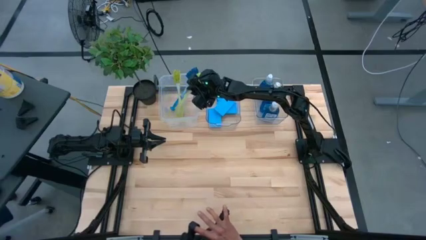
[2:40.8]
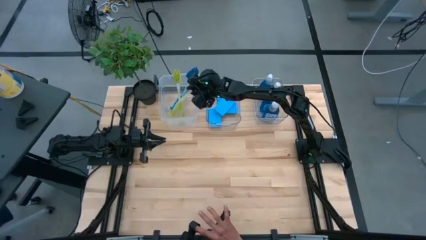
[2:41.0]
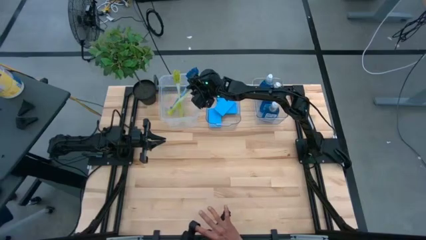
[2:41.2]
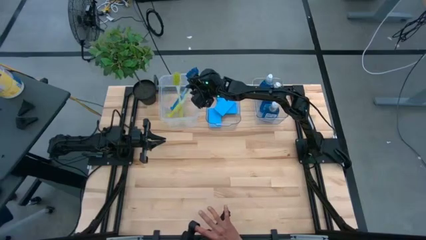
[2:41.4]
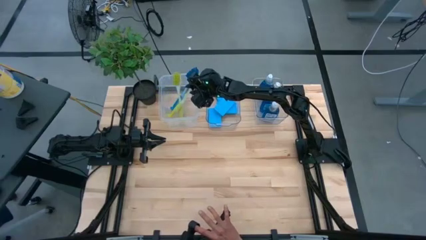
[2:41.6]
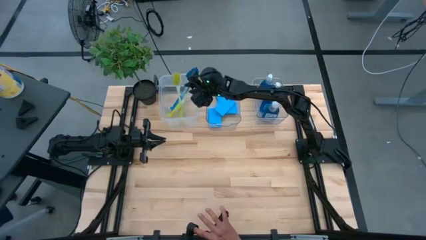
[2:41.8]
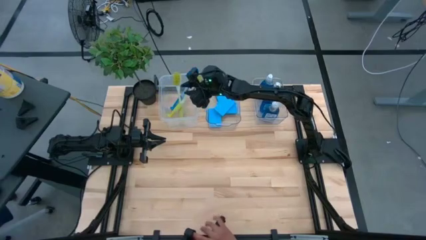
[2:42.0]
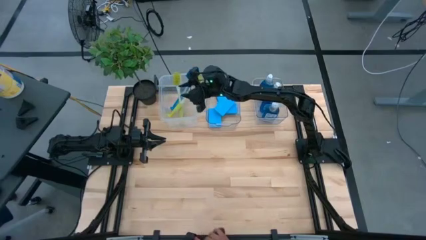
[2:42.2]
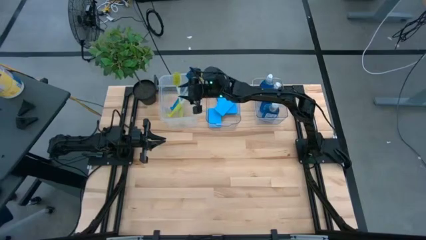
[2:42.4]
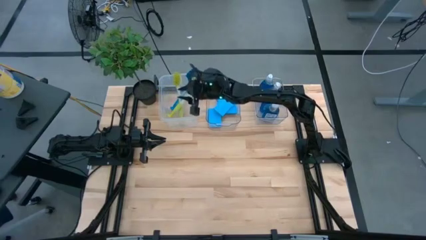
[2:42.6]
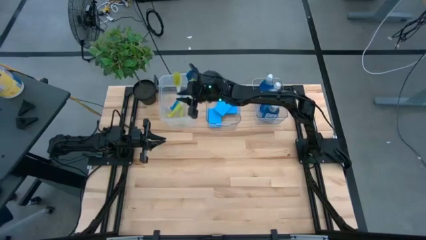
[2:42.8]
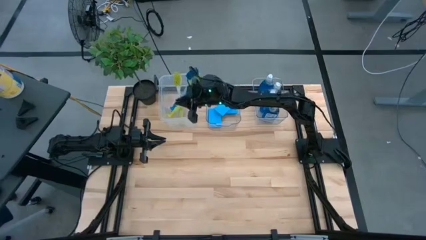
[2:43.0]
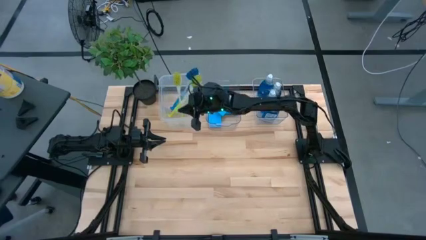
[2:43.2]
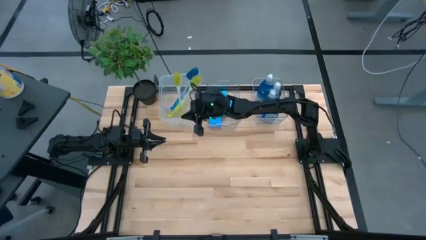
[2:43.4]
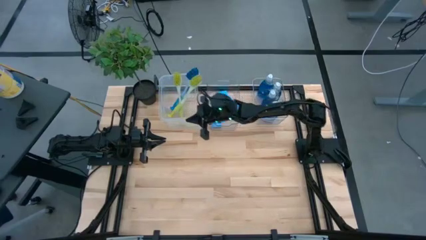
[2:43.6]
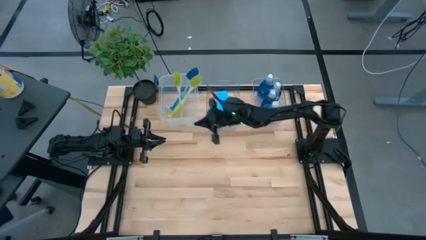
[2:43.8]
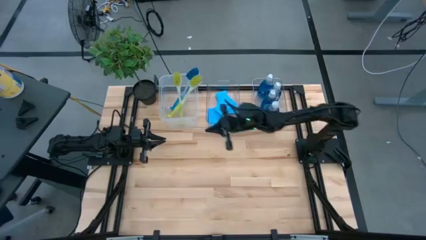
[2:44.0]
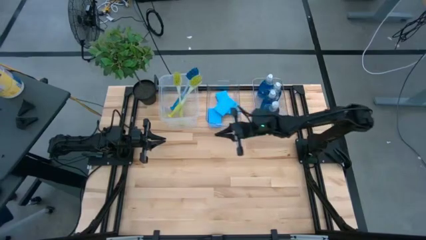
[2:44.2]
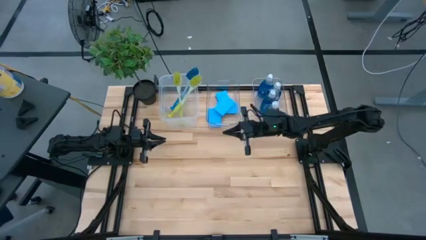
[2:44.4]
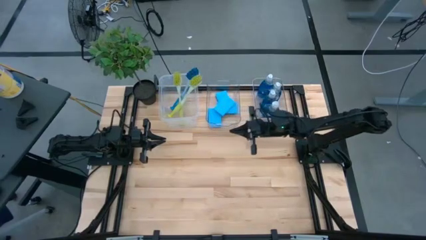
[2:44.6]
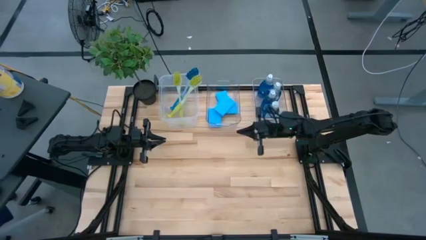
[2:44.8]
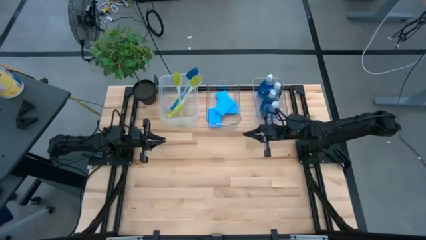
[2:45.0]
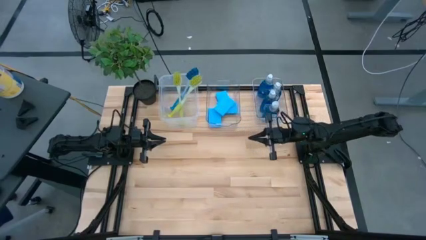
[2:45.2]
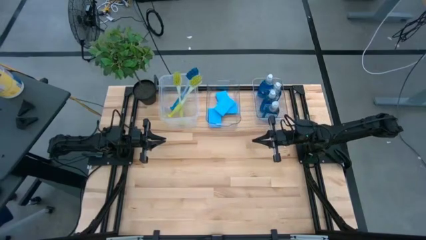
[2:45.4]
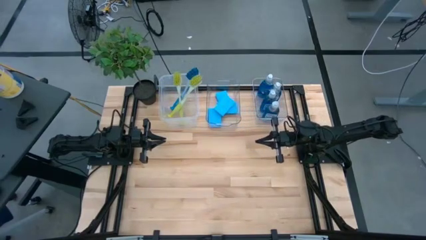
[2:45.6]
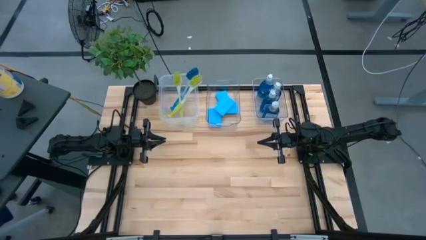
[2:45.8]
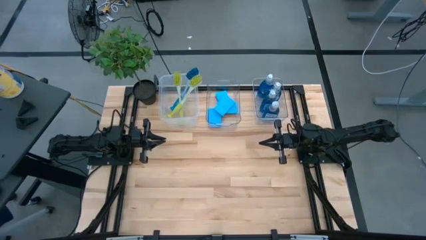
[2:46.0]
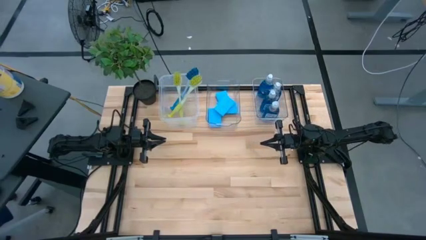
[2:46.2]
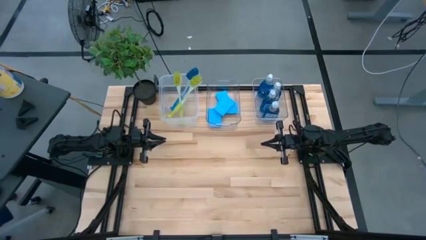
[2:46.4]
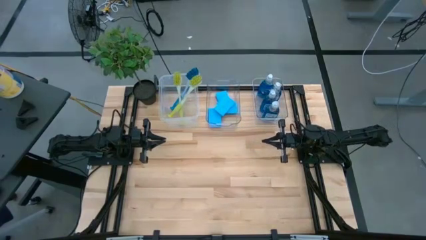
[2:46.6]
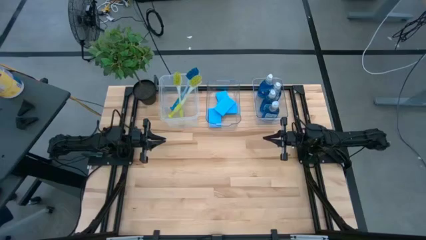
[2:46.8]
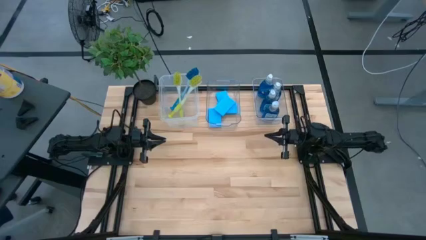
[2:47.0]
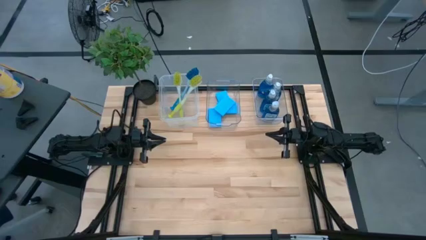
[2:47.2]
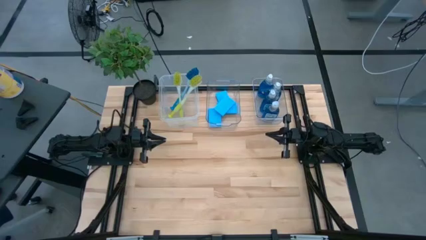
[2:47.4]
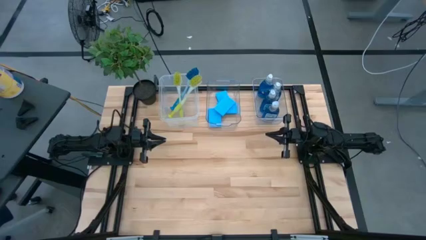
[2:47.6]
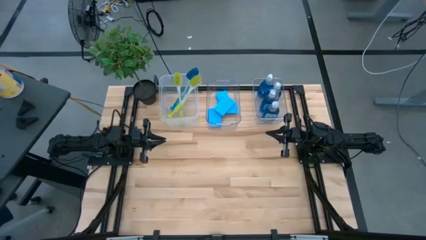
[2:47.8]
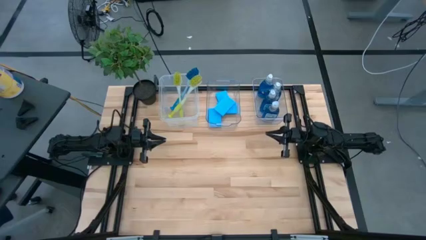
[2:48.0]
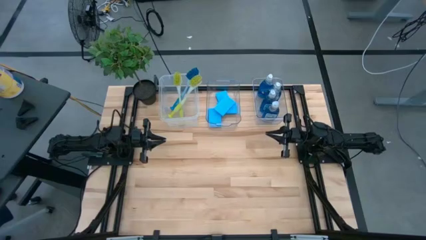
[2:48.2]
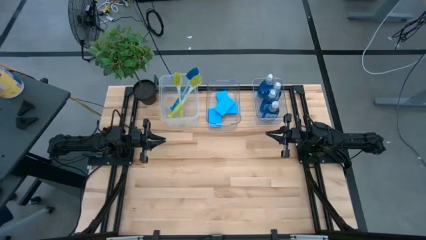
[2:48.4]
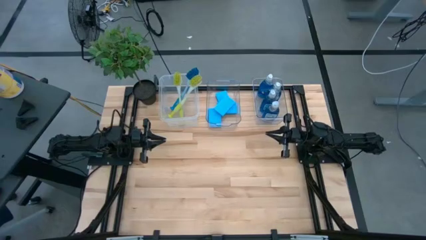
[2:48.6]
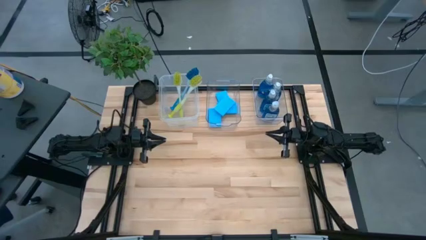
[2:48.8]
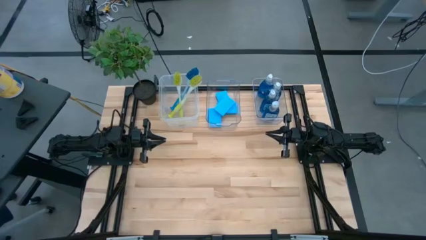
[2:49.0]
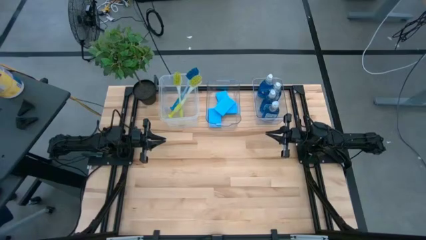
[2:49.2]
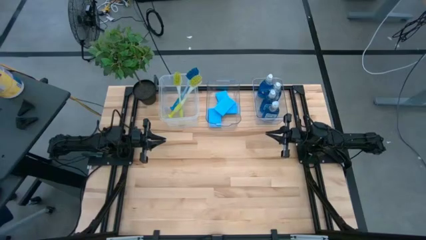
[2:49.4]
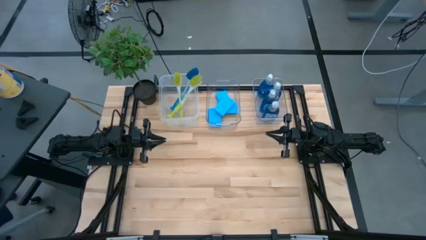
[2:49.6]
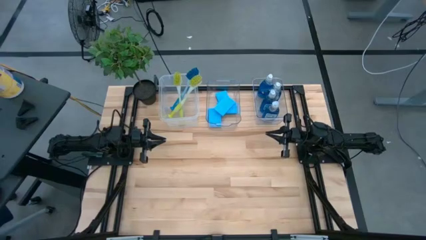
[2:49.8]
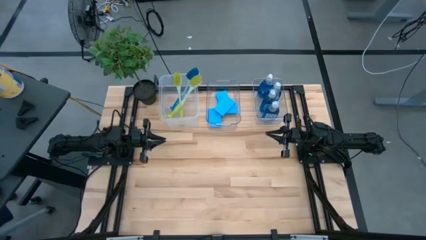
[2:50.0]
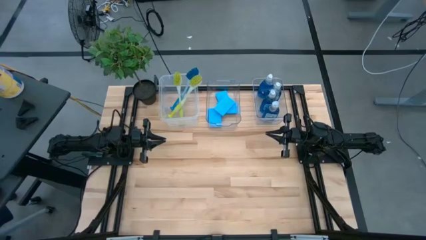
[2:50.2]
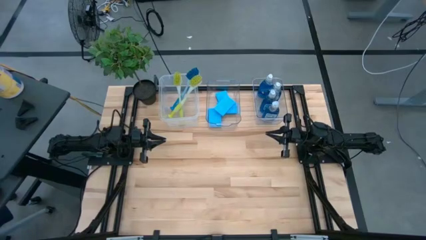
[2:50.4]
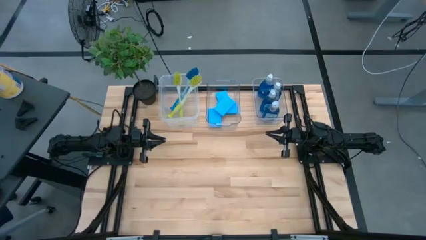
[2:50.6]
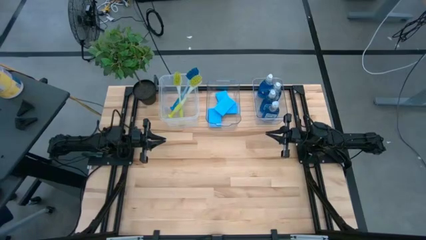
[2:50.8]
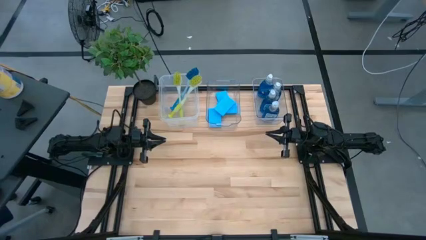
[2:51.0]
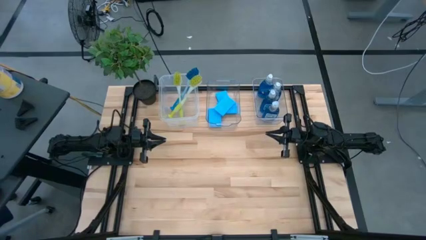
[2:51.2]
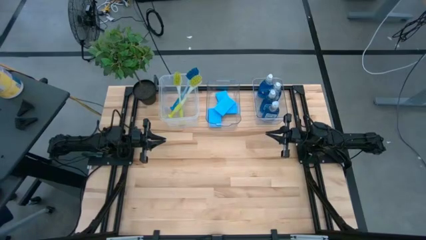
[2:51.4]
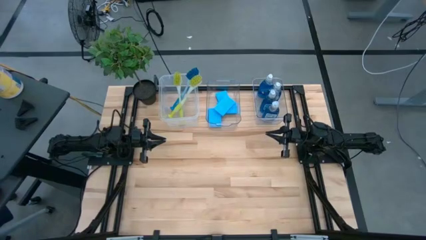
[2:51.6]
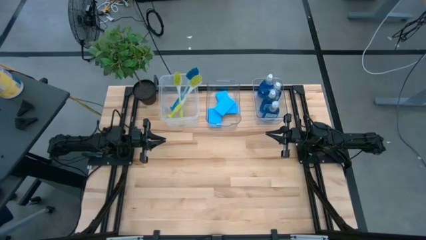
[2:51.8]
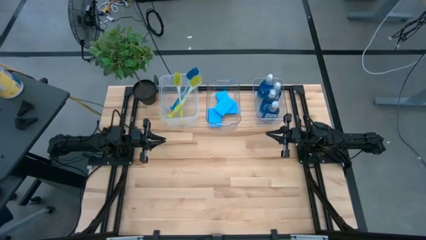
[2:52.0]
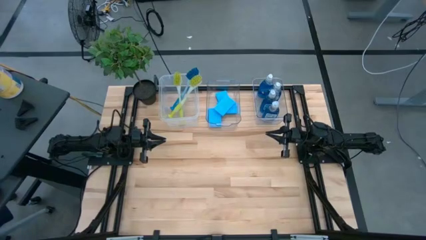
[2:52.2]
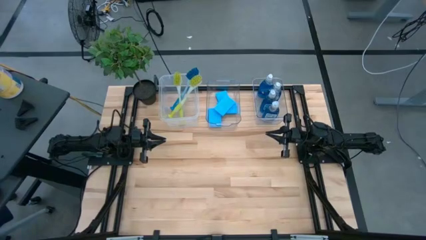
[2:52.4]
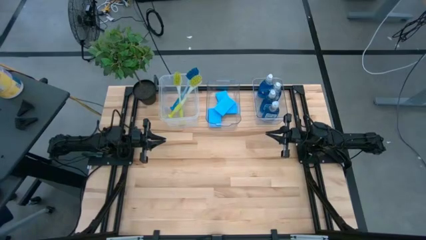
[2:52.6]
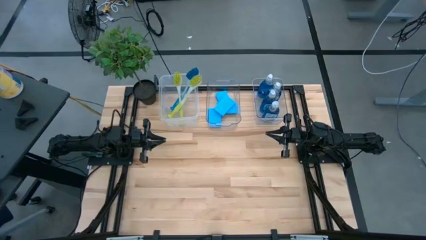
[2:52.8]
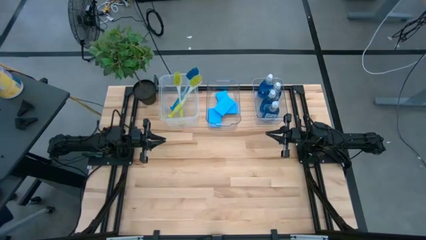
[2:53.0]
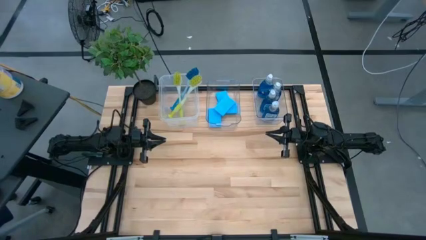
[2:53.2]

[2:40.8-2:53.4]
Task: Pick & Place Kitchen Sink Supplies
Return to home position

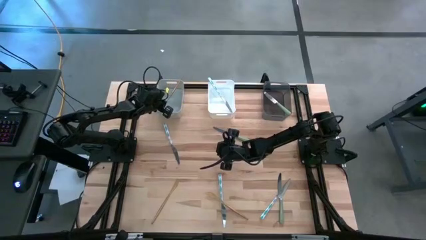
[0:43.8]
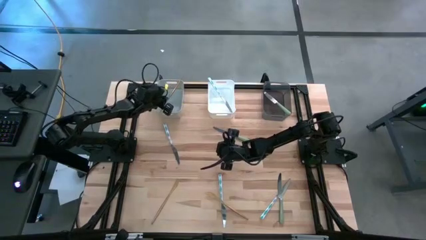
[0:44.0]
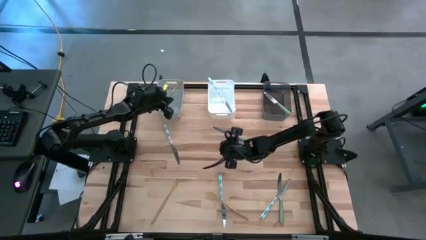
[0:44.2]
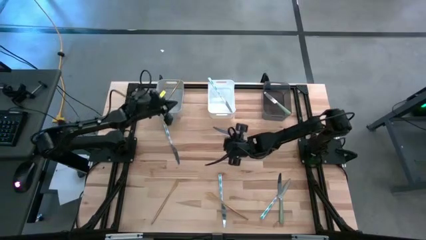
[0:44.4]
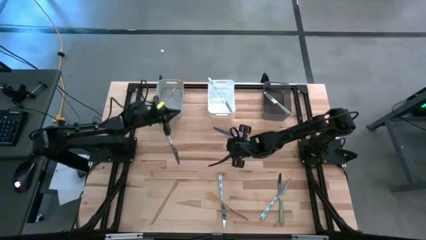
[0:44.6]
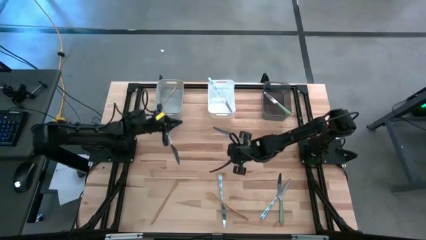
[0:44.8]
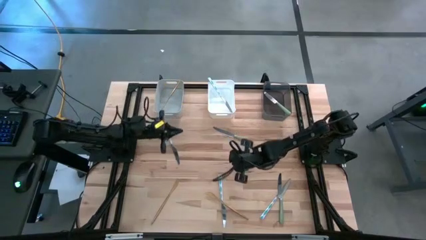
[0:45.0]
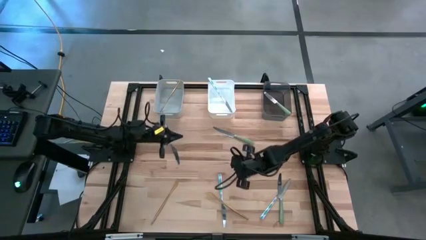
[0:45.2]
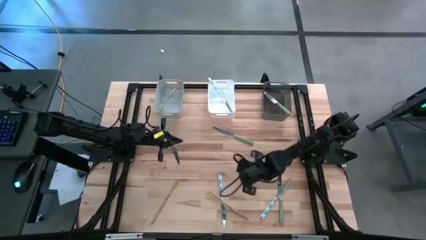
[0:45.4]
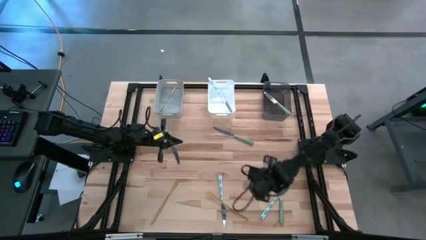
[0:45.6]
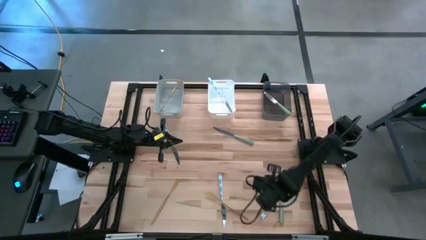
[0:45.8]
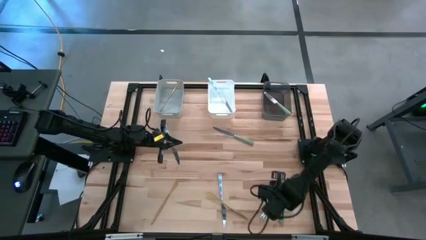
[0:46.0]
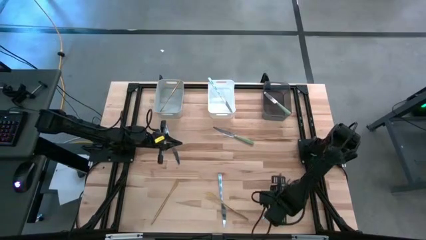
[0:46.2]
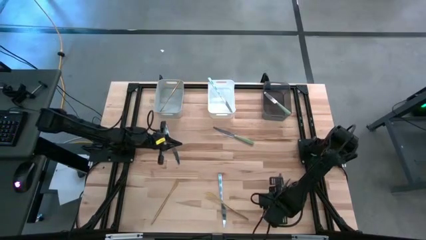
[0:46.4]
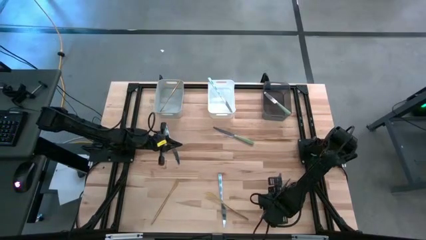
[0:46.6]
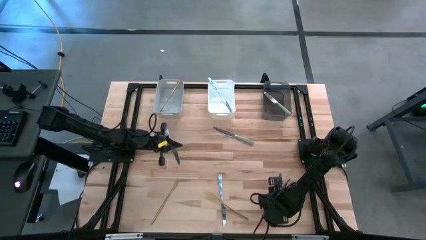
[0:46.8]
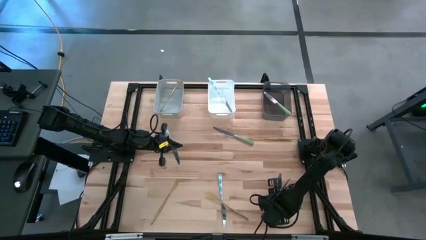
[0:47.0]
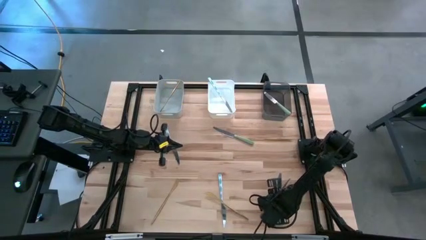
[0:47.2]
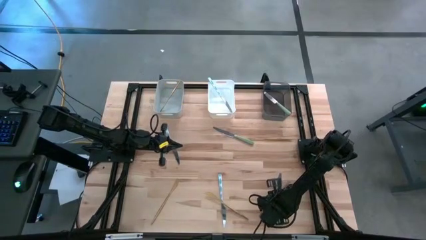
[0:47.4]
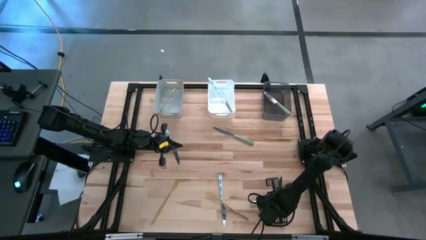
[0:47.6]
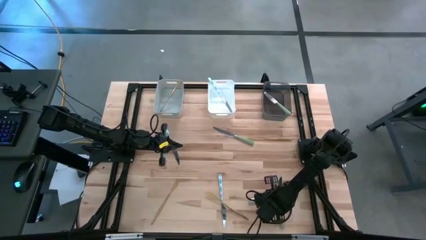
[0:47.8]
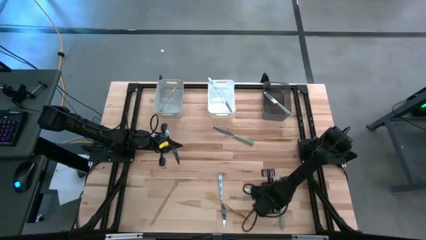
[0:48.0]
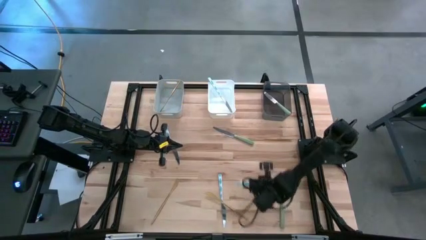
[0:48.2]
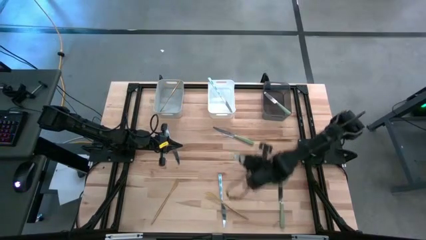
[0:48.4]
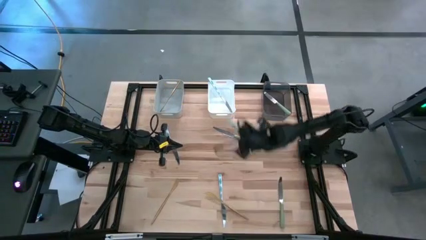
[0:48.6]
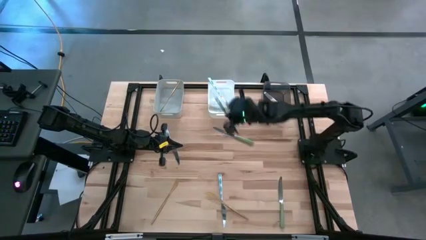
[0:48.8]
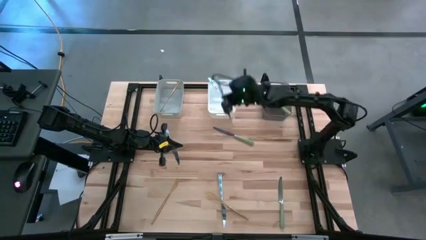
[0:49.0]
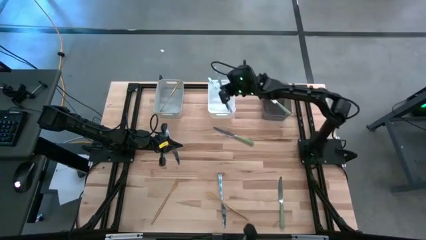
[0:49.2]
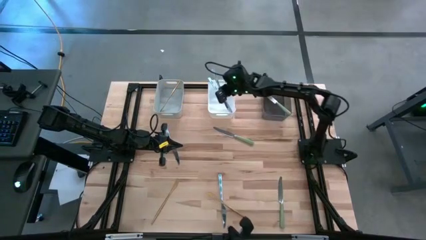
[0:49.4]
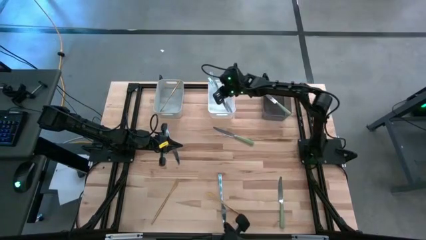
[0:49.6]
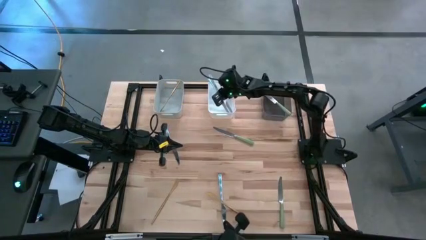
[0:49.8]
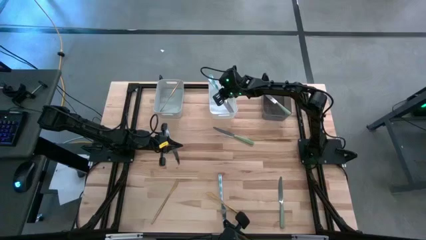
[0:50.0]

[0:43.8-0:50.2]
Task: Sort silverware by color (type)
Put the bottom right blue table knife into the white bin
